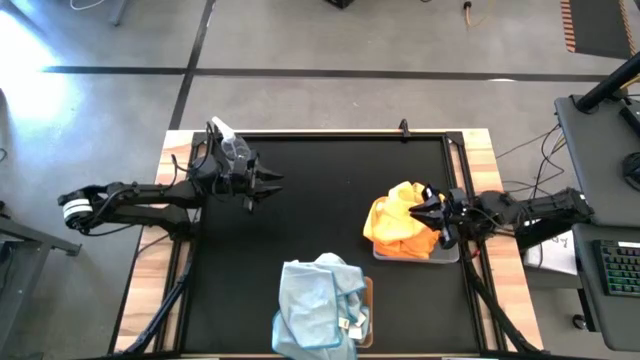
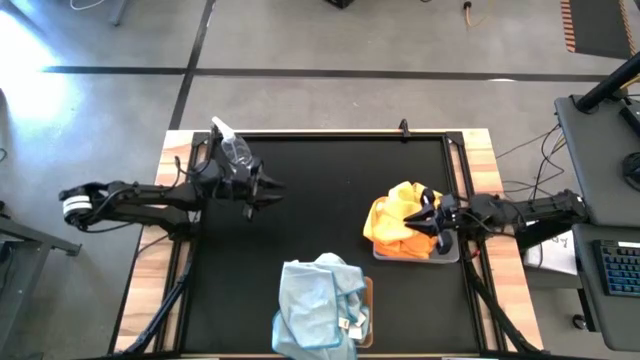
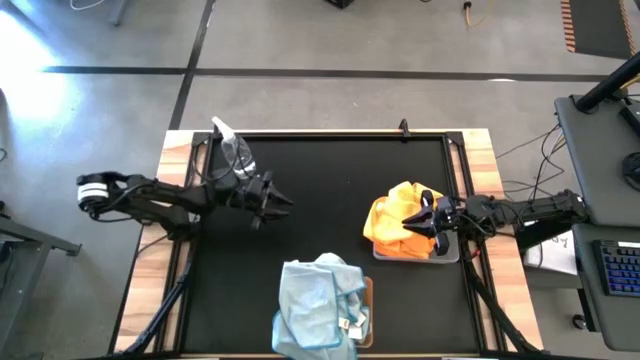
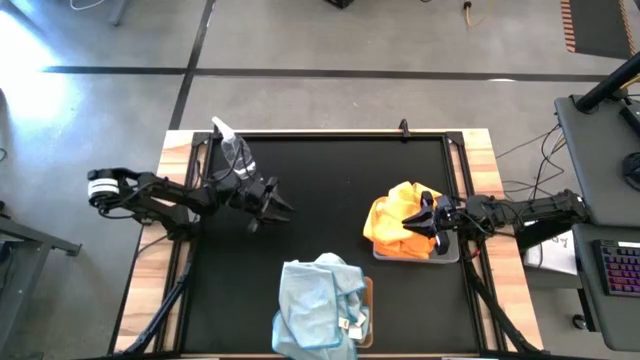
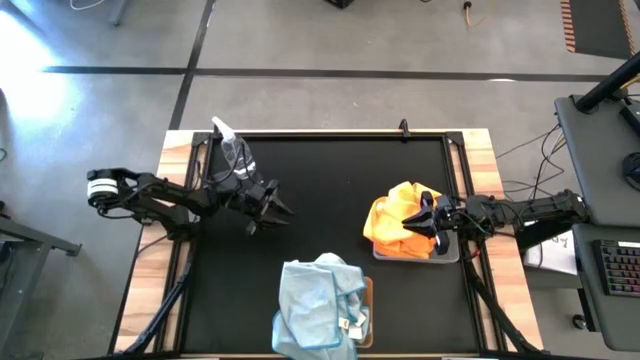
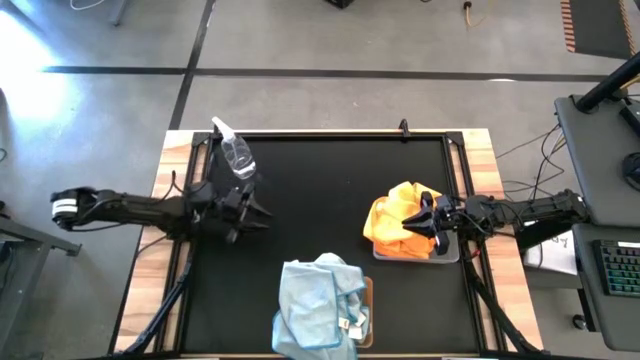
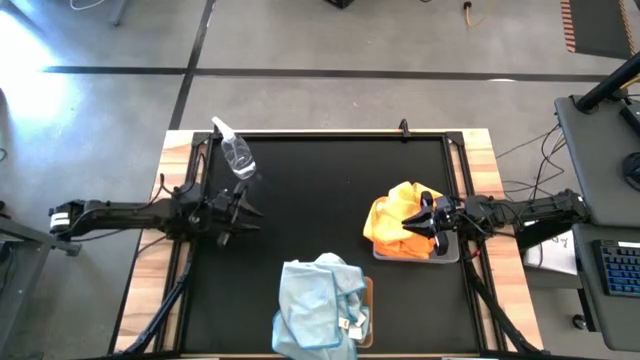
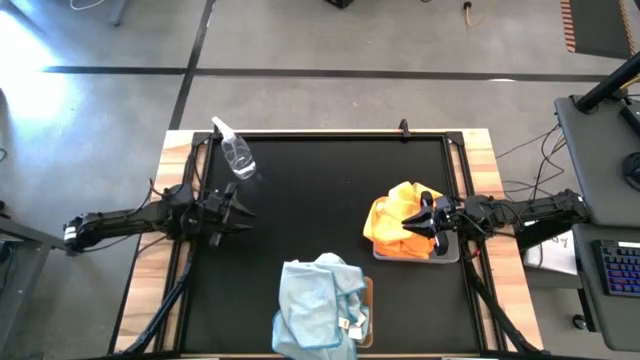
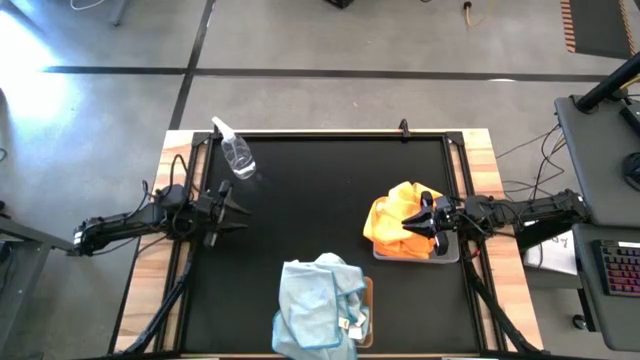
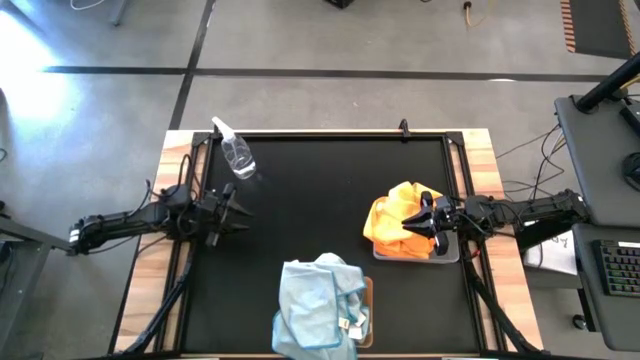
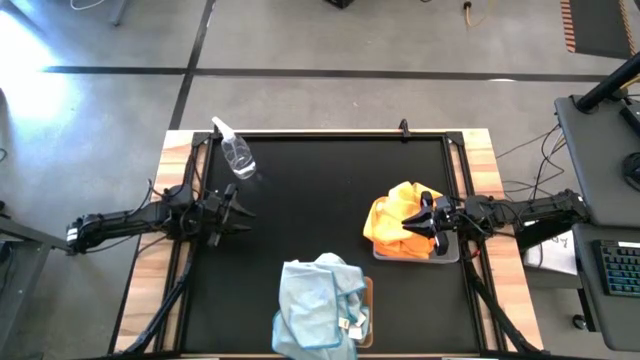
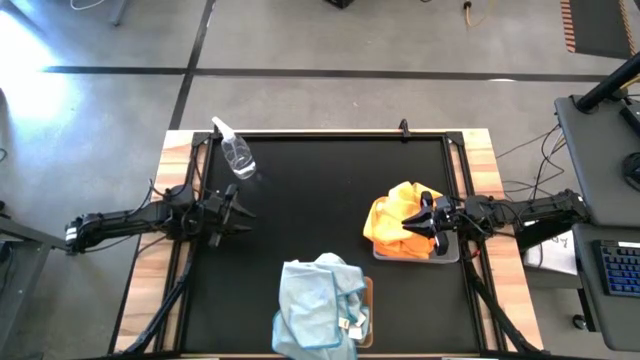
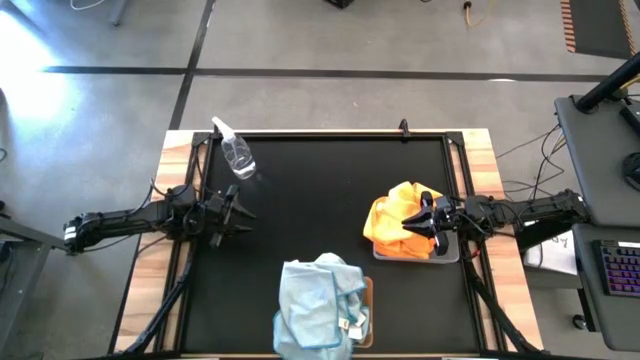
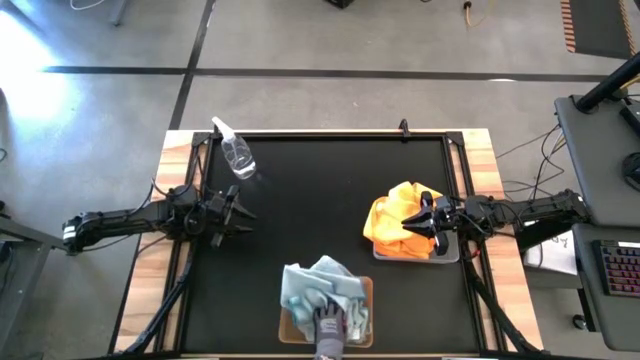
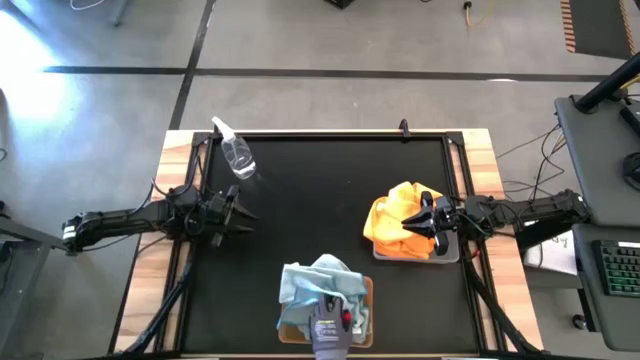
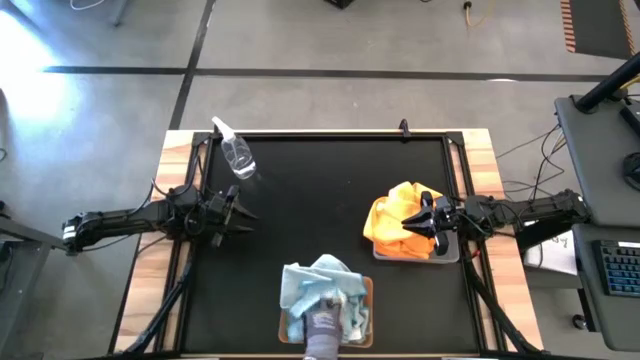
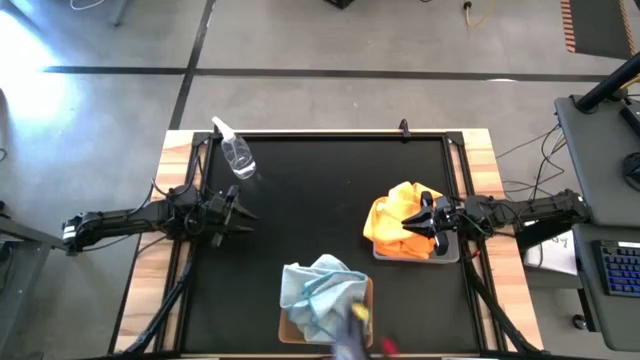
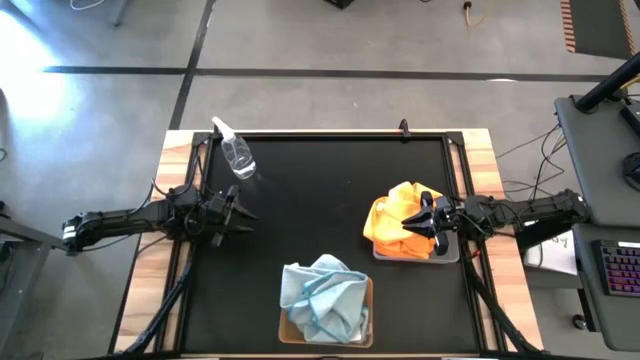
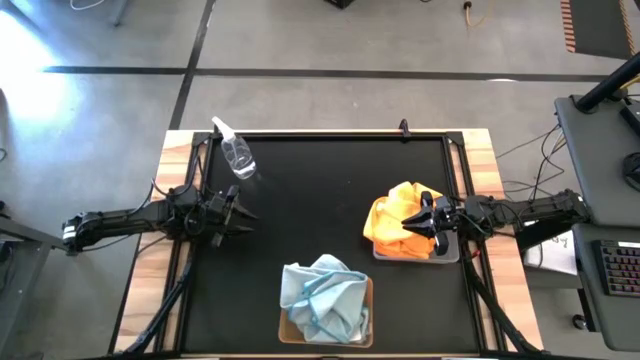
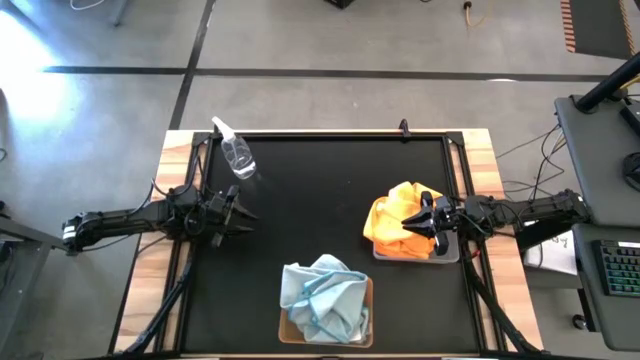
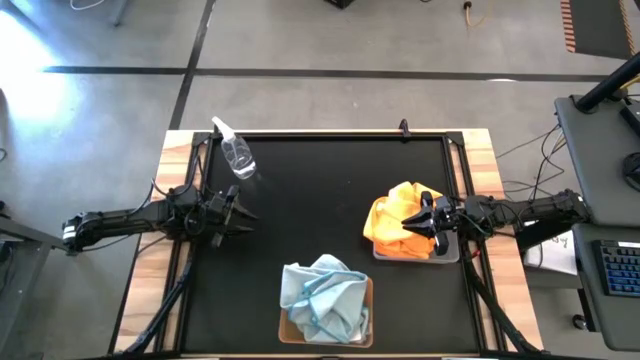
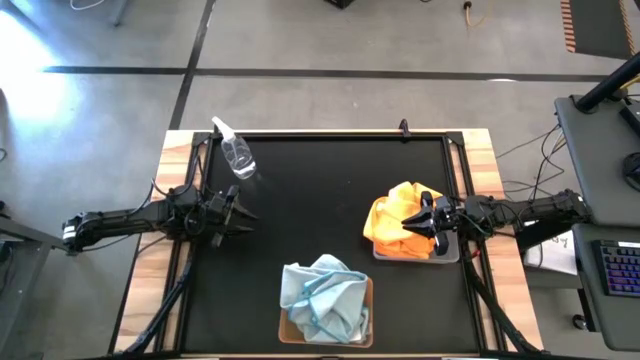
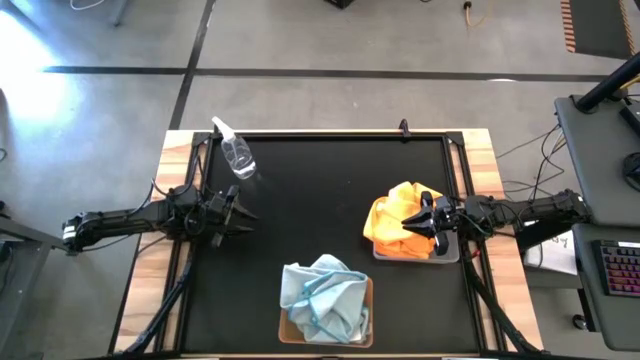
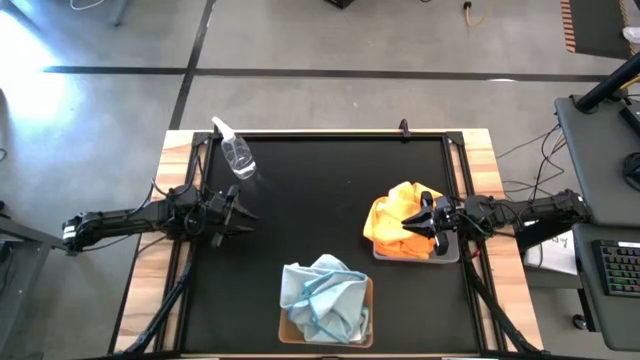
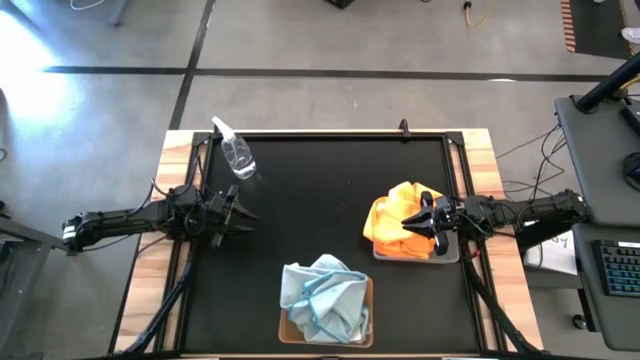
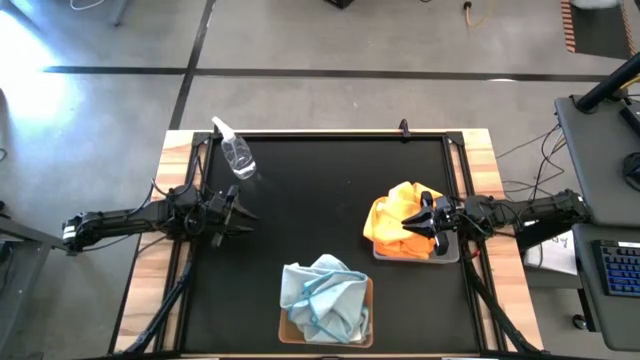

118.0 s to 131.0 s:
Task: Sort microfiber towel by color & place in baskets
Return to Home Position
